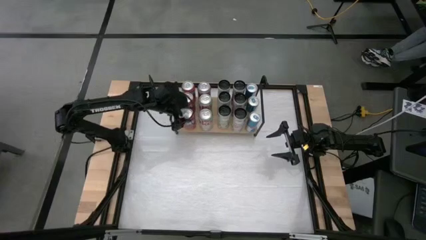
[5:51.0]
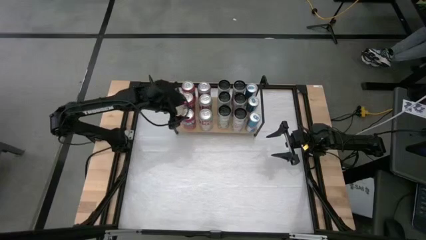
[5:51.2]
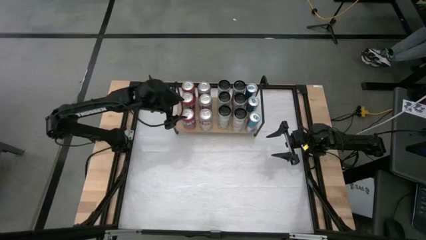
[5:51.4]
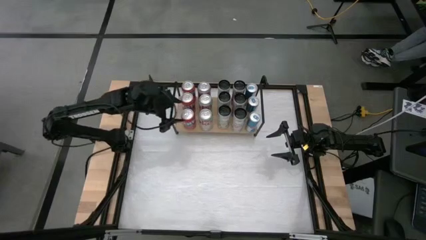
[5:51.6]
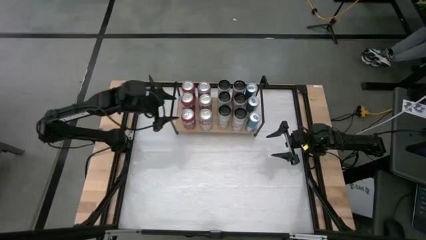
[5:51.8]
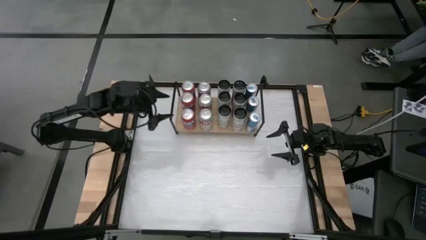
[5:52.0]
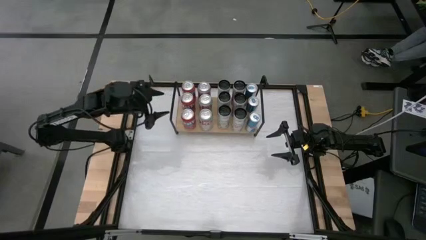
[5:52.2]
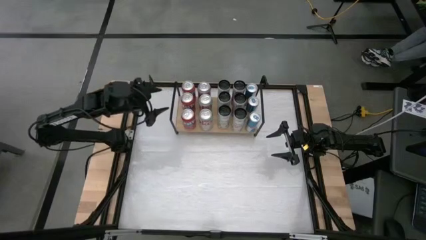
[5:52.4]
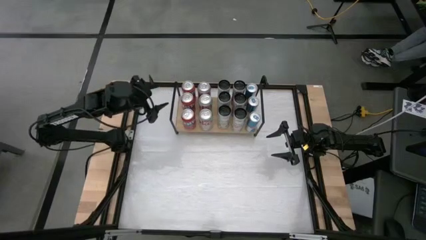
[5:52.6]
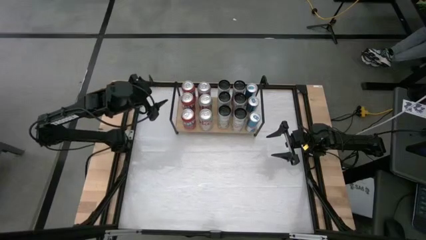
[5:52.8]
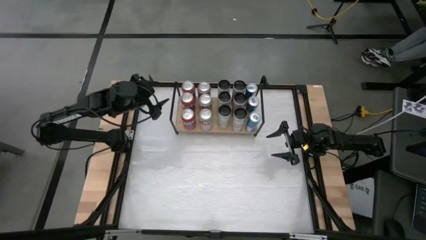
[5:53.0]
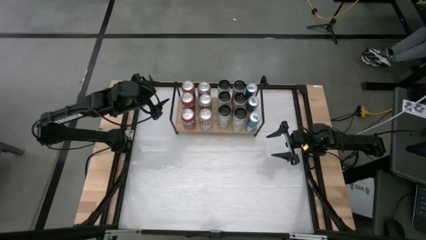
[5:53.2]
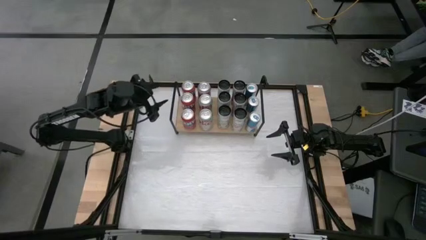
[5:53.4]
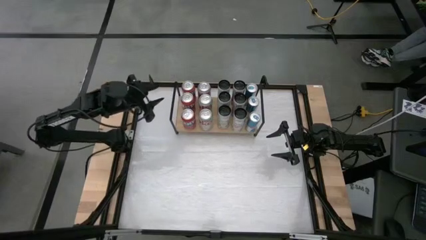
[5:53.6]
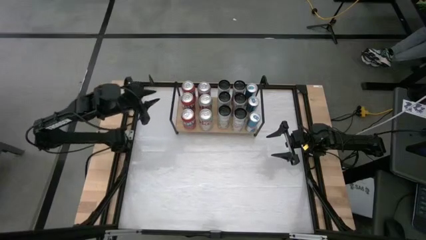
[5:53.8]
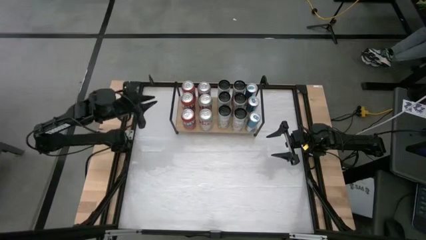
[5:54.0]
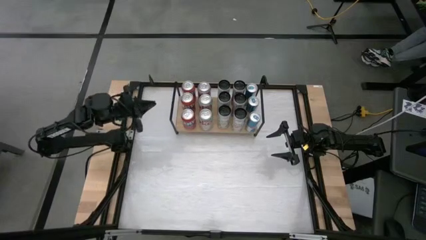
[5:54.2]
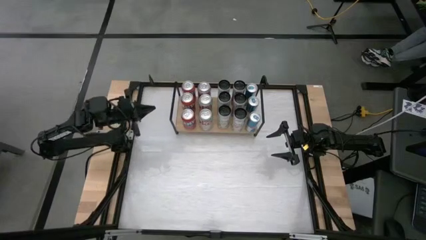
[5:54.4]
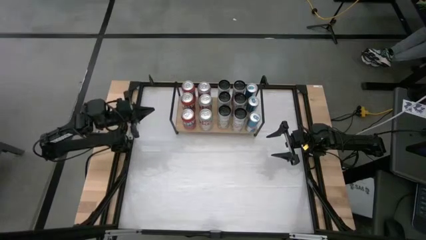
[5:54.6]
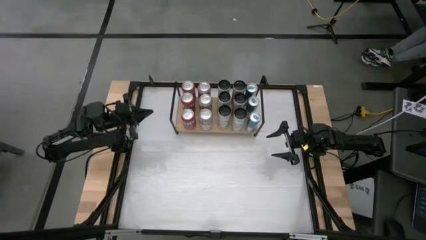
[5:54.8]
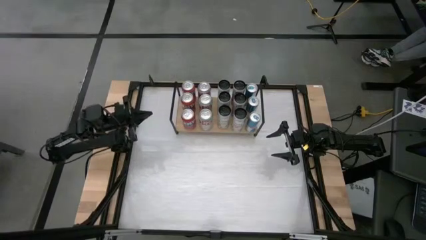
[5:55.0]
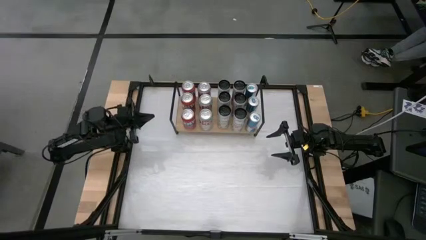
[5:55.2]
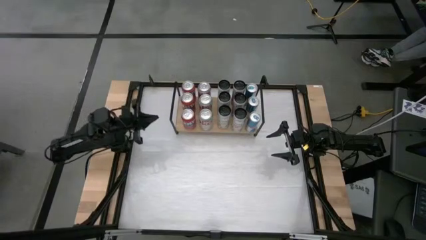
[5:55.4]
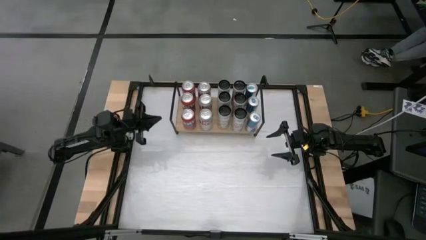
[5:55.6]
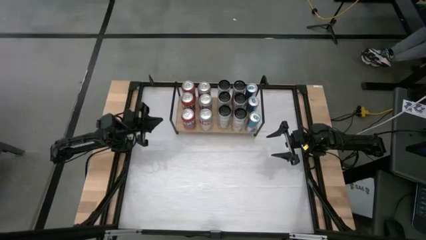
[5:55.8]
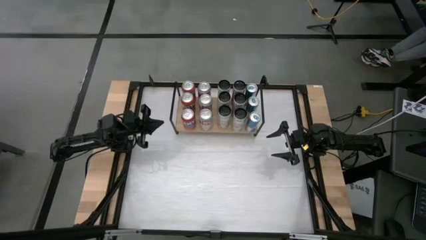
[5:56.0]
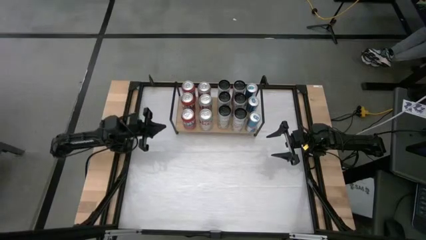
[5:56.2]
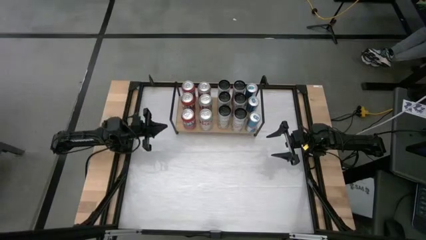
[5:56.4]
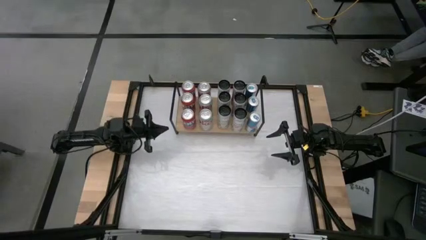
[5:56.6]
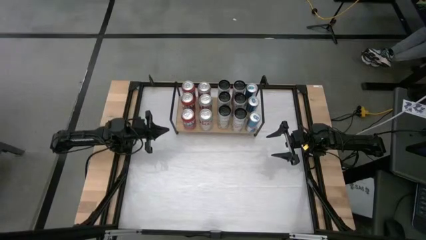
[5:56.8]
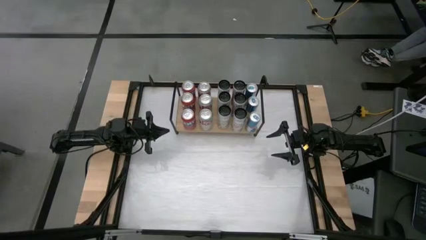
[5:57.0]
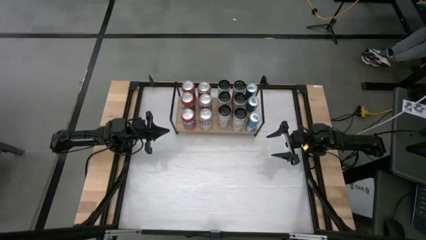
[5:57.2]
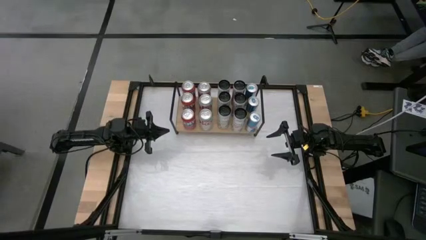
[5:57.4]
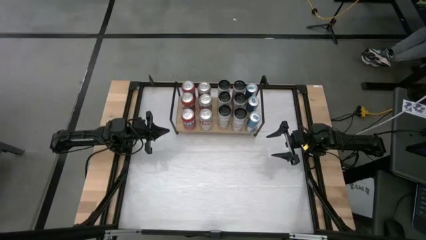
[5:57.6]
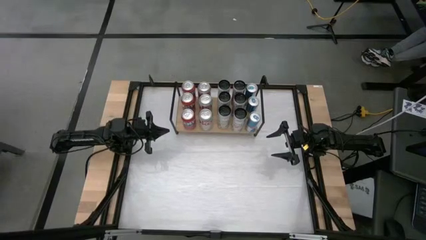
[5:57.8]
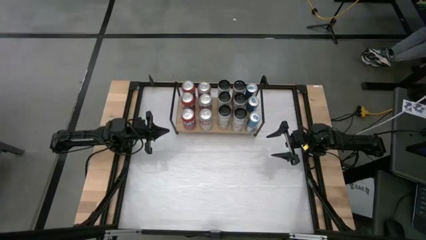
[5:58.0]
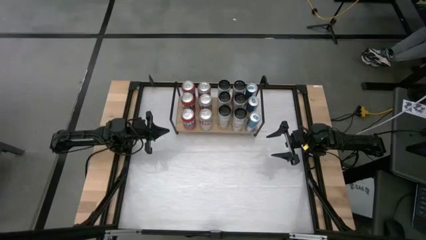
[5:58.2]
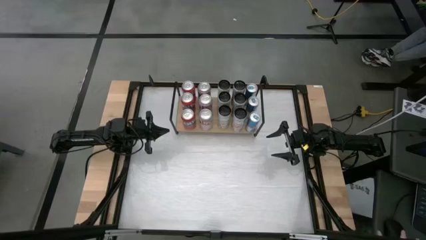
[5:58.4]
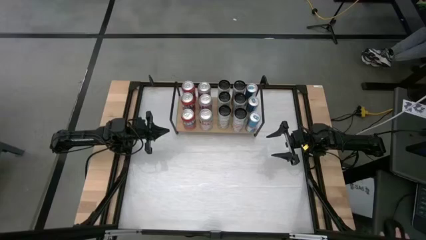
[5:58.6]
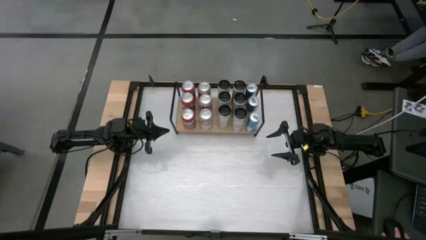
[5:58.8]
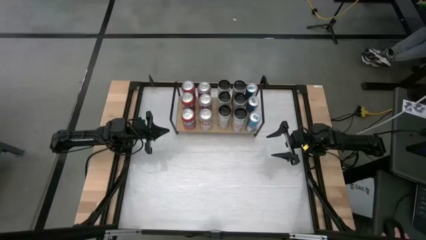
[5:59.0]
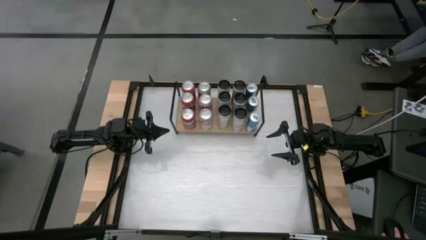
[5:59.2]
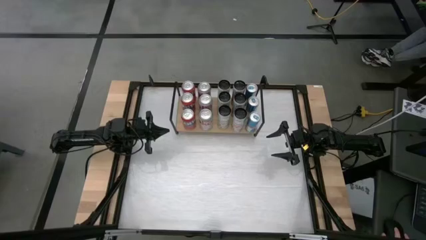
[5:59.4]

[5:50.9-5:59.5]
Task: Place canned beverage on shelf
Return to Home Position

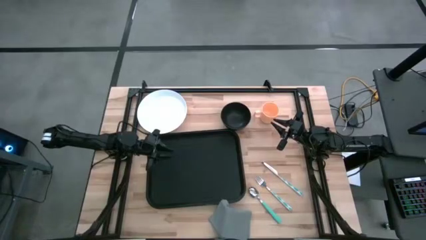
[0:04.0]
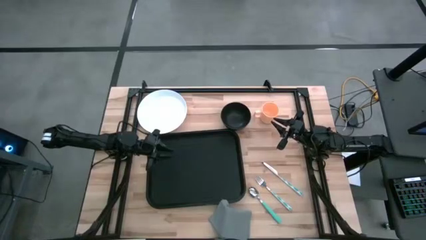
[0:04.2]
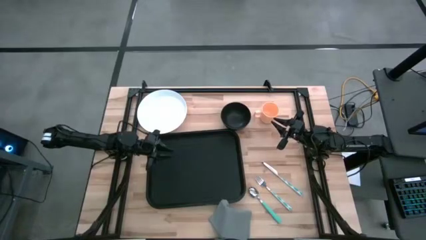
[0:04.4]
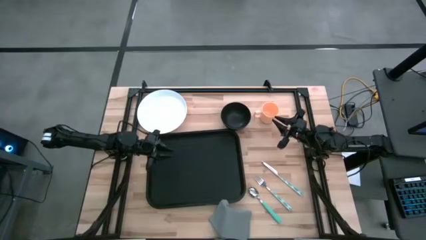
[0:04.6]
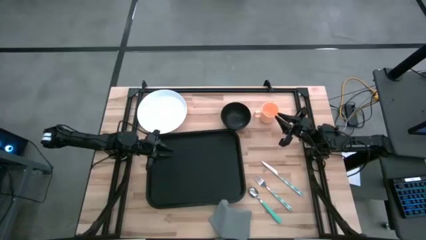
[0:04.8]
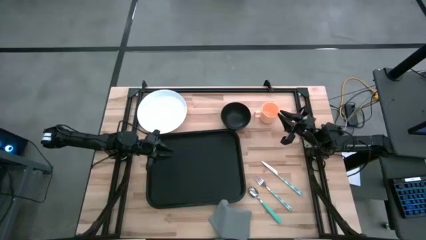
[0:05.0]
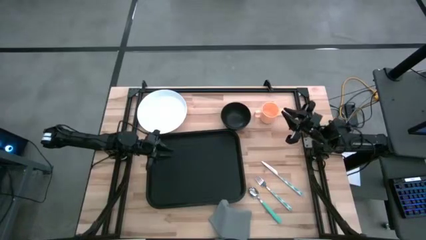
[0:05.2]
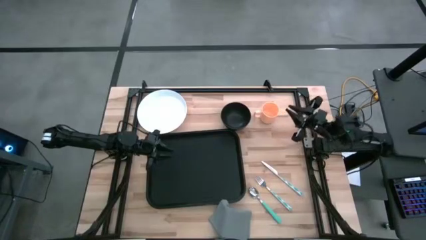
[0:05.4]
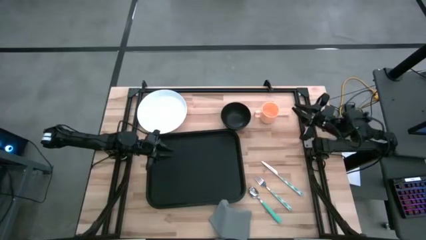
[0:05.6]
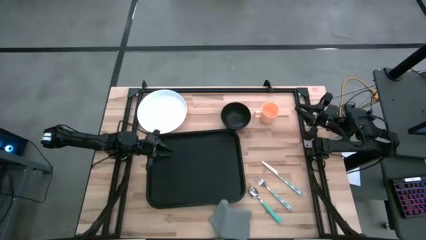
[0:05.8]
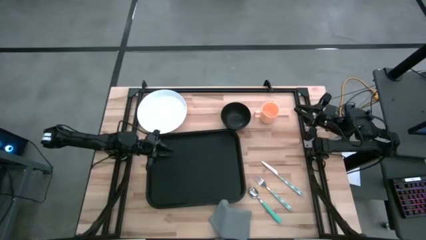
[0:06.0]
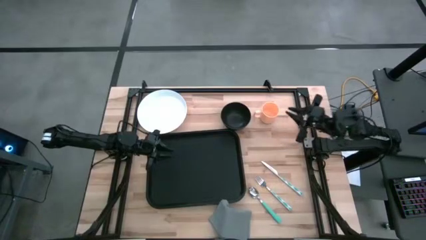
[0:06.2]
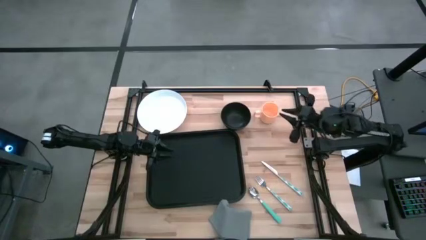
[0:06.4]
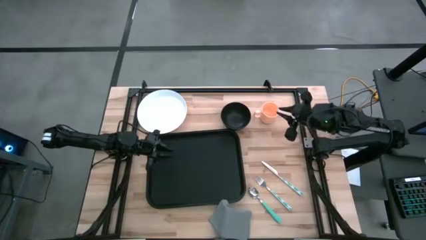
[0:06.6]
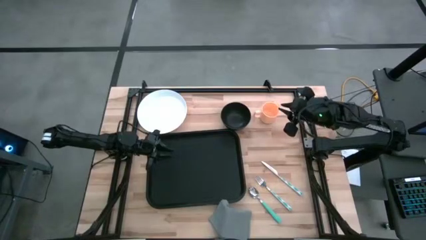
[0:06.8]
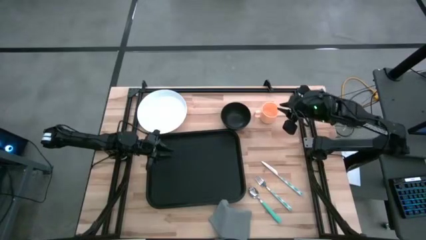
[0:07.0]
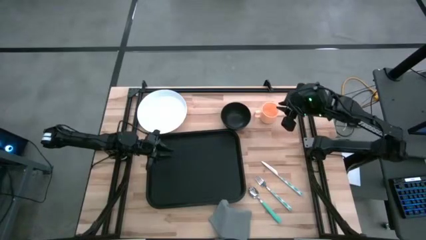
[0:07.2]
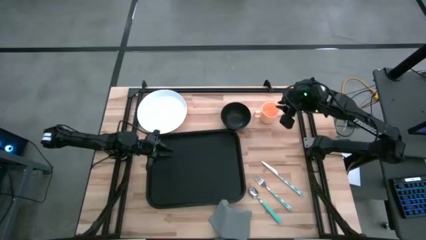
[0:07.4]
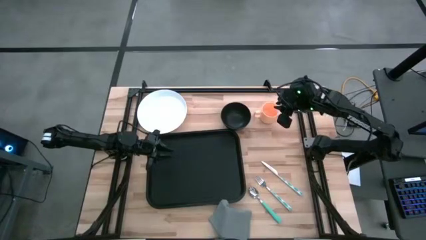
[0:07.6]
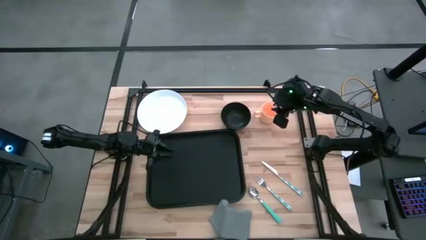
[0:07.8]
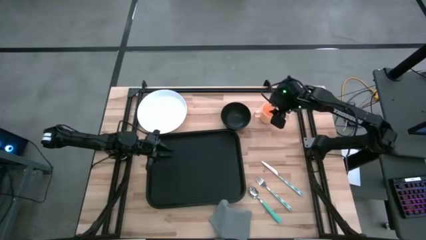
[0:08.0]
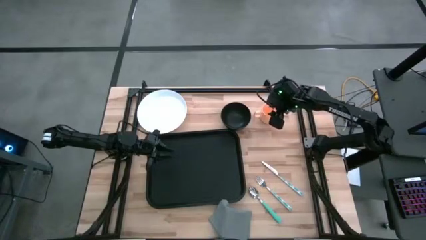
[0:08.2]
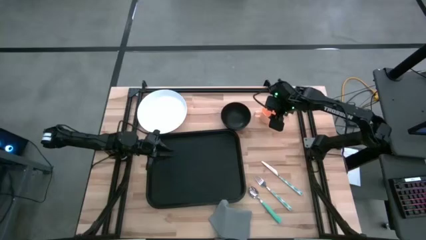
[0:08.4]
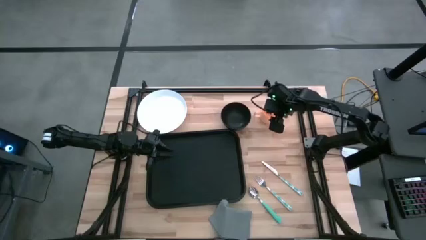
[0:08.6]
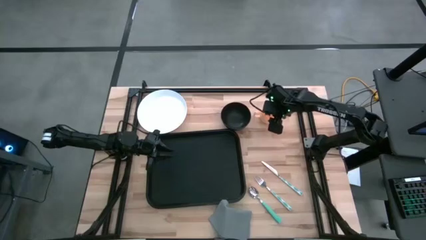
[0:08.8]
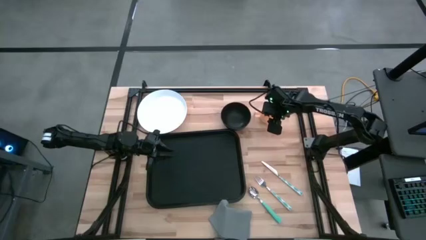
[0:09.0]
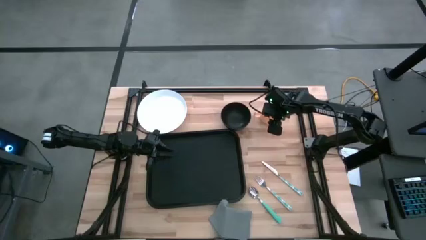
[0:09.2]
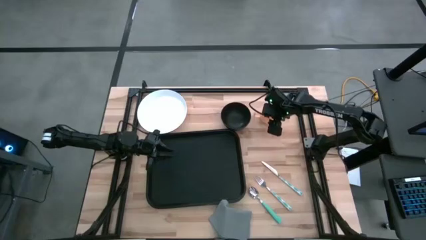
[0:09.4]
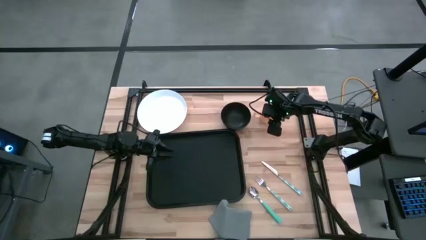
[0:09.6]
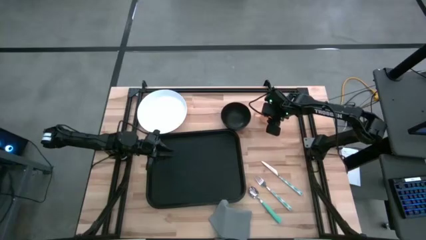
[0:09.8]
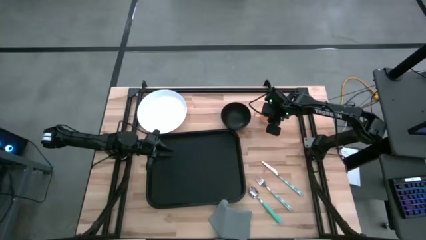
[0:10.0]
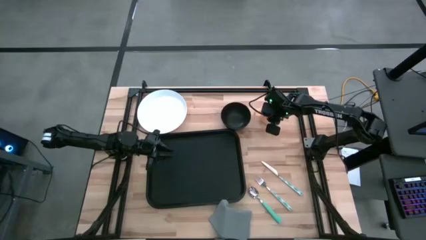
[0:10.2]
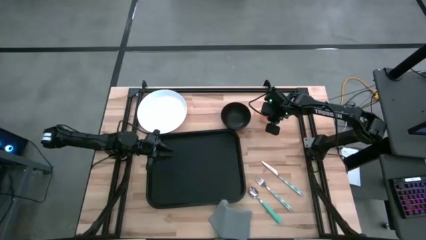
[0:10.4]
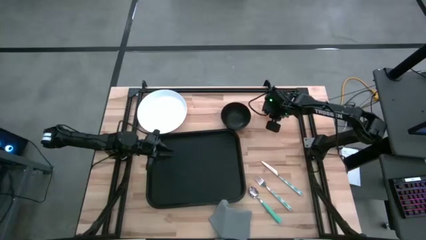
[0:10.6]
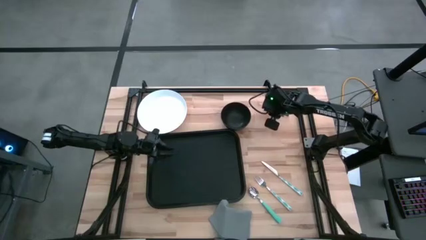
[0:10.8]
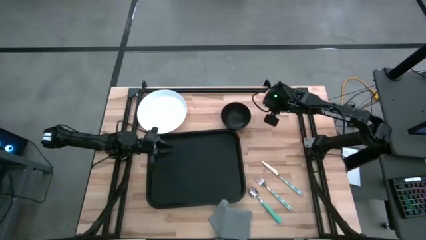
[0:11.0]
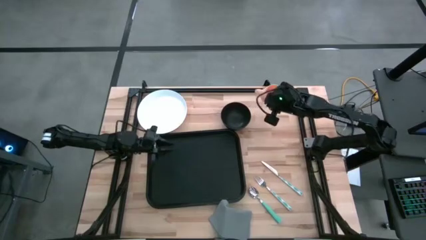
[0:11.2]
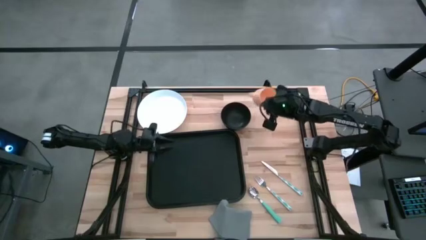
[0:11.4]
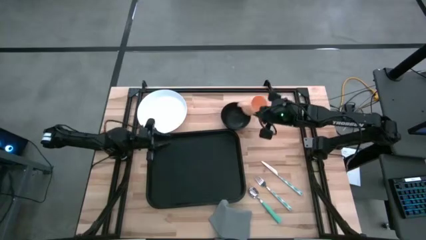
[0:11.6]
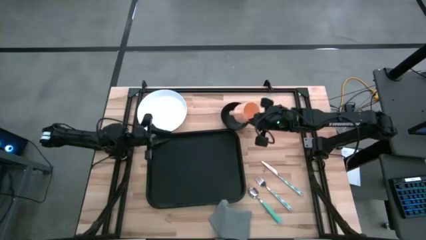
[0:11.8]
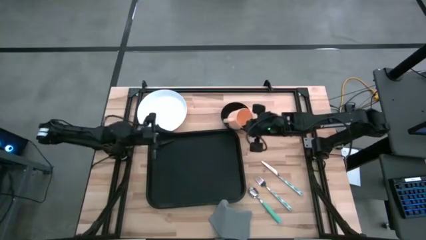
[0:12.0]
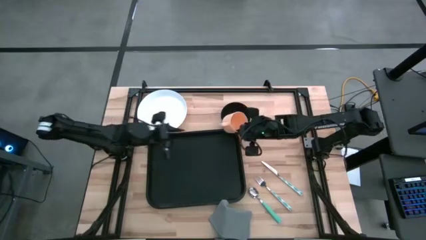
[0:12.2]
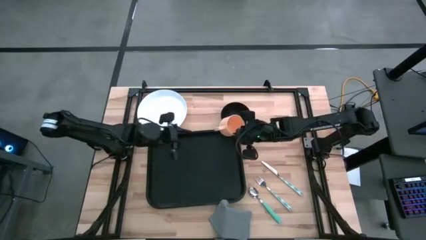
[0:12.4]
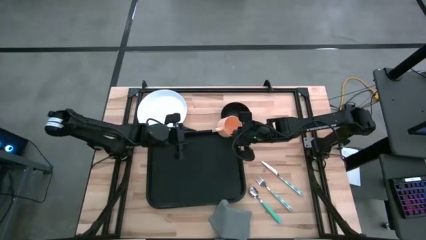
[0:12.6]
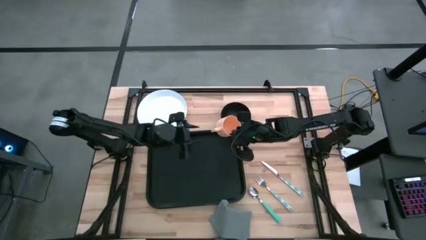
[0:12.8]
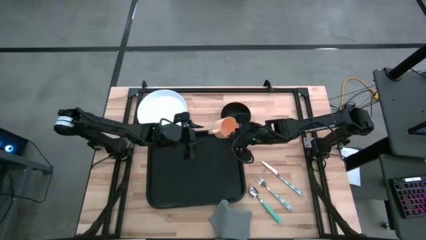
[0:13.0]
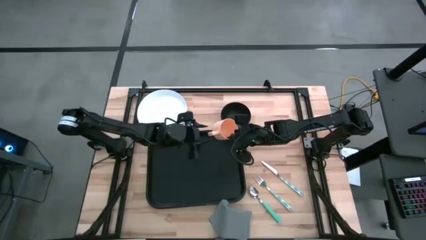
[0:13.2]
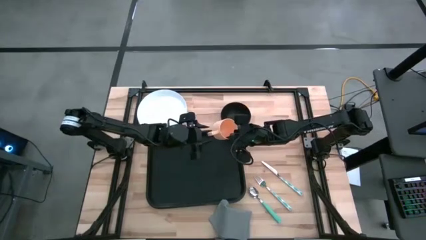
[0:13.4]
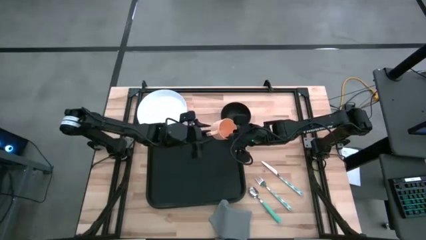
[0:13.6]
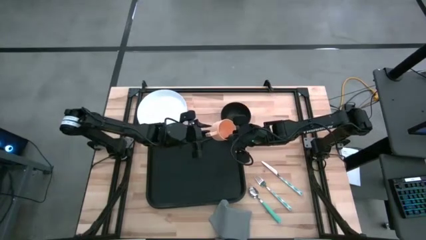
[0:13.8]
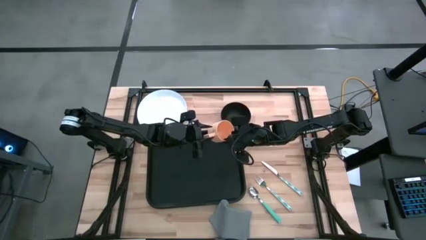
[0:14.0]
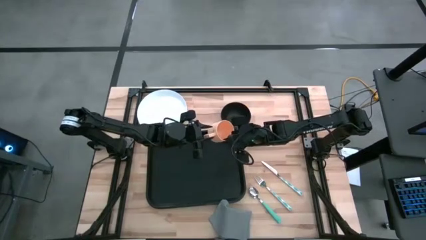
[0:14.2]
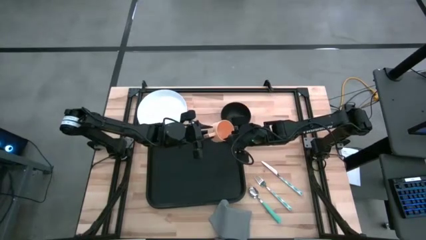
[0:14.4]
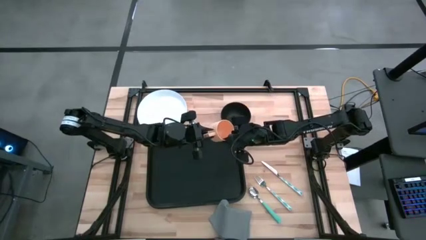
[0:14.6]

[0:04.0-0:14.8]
Task: Set up tray
Put the orange mug on the black tray
